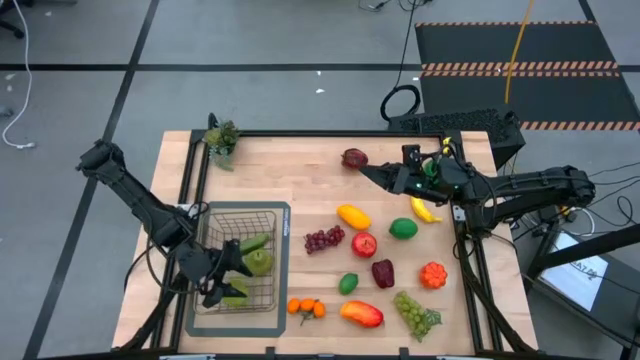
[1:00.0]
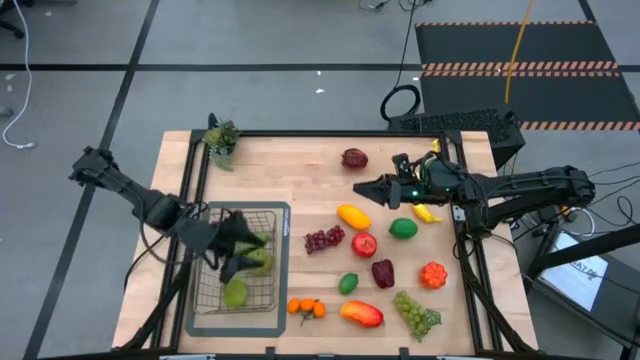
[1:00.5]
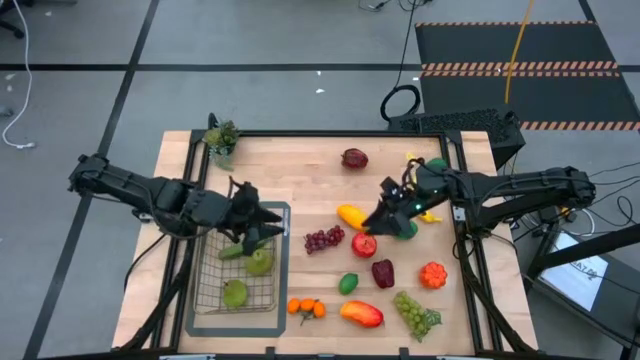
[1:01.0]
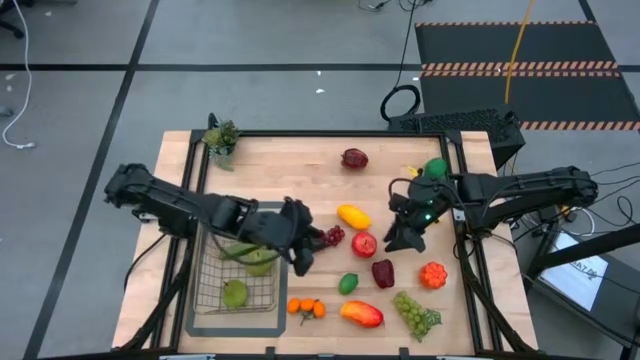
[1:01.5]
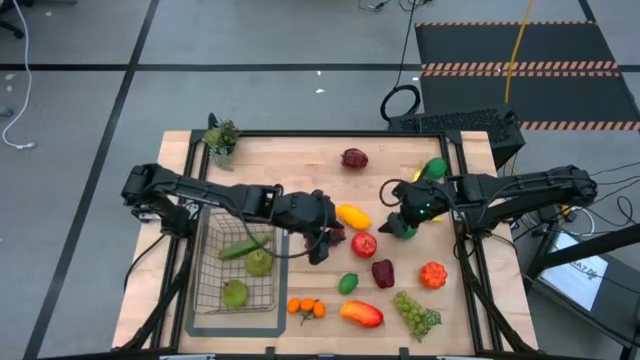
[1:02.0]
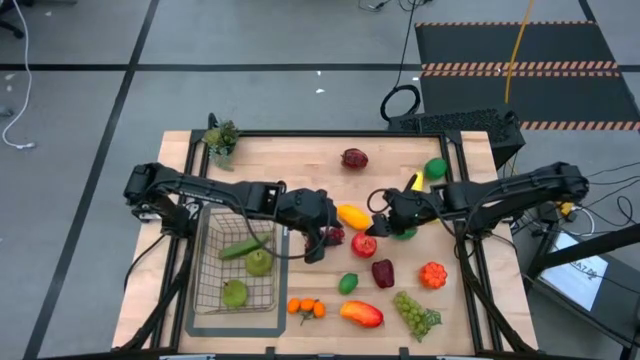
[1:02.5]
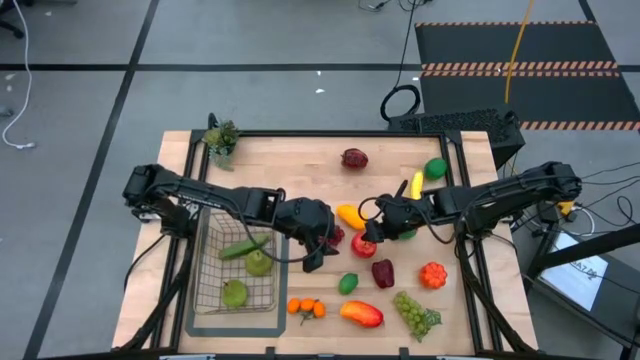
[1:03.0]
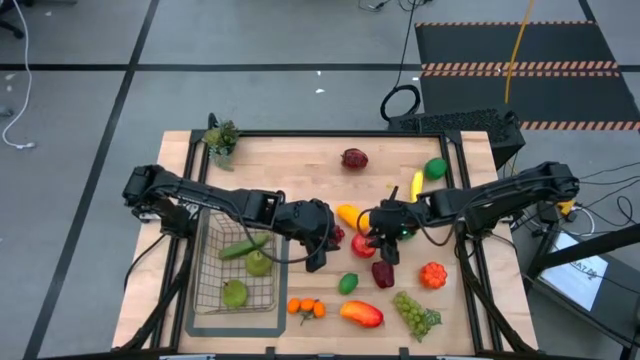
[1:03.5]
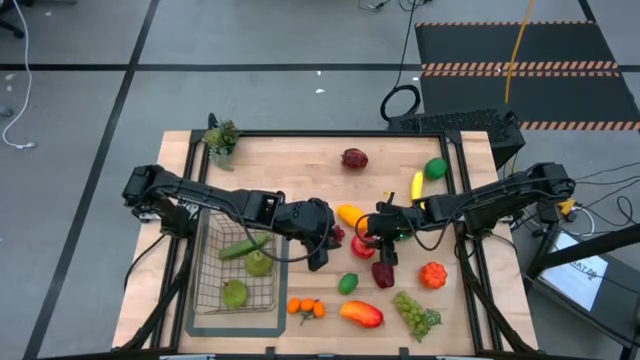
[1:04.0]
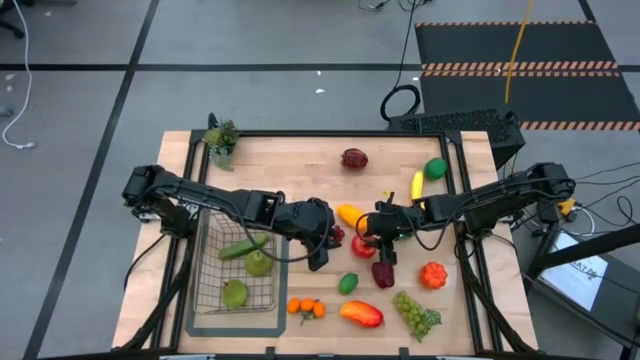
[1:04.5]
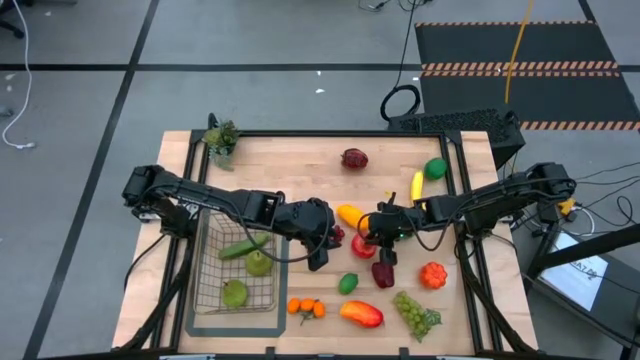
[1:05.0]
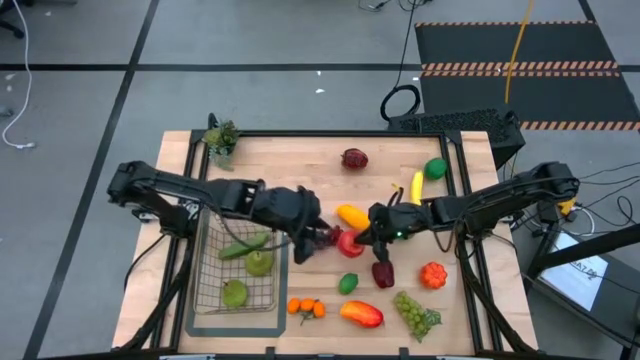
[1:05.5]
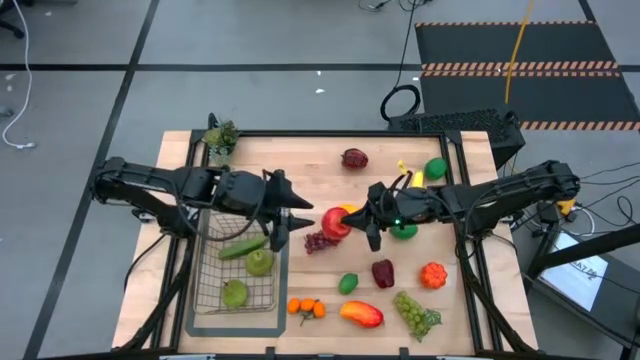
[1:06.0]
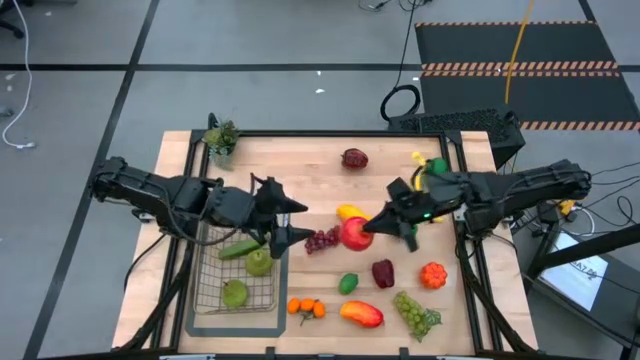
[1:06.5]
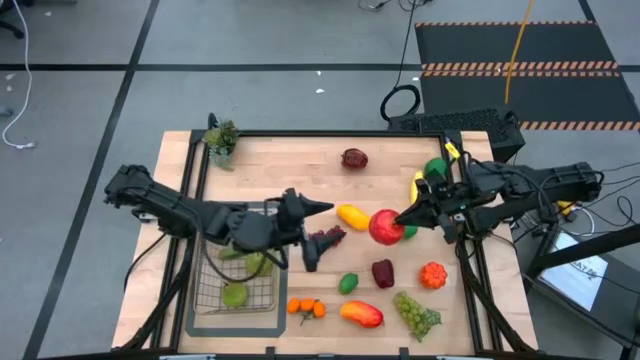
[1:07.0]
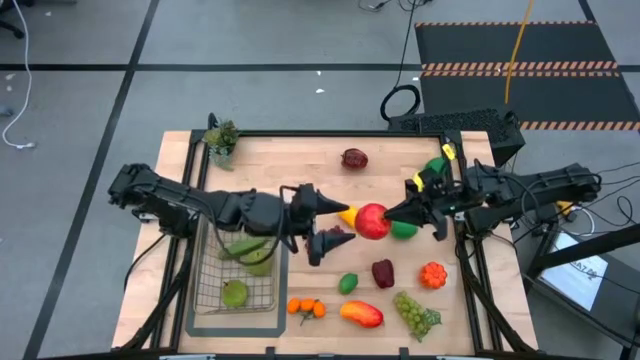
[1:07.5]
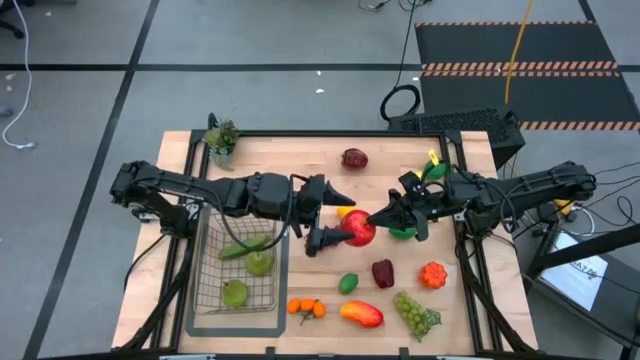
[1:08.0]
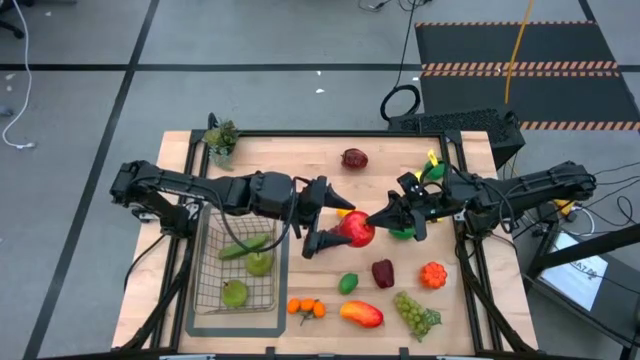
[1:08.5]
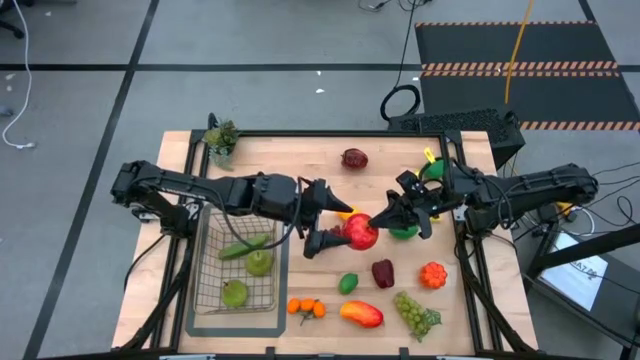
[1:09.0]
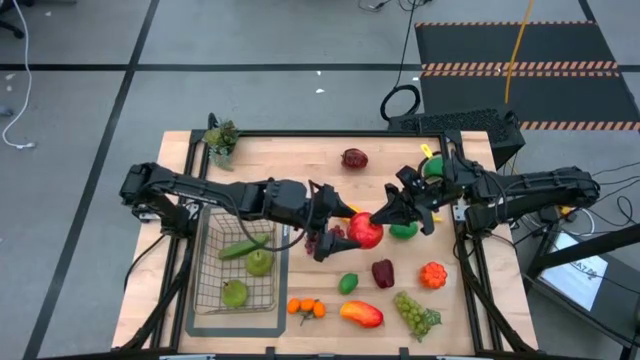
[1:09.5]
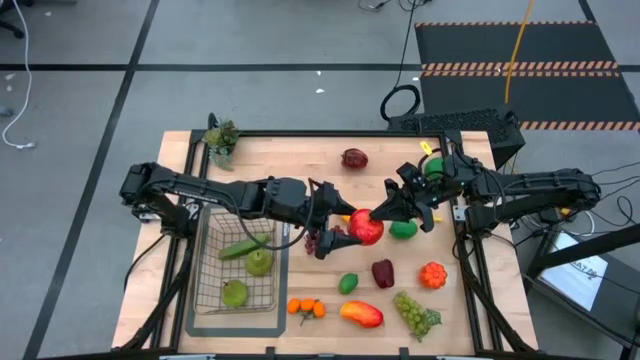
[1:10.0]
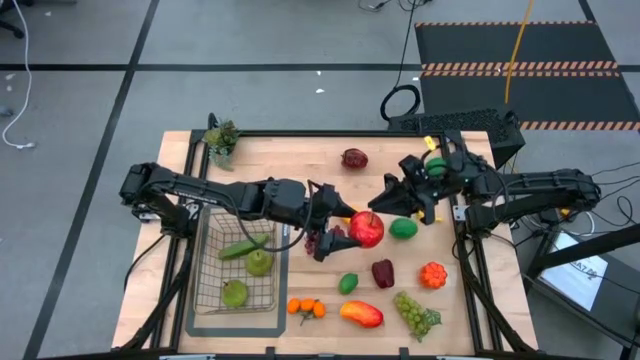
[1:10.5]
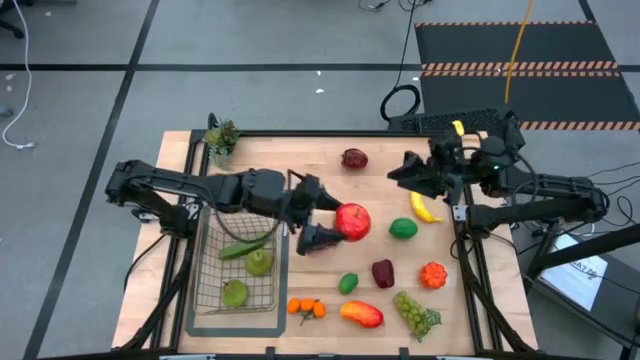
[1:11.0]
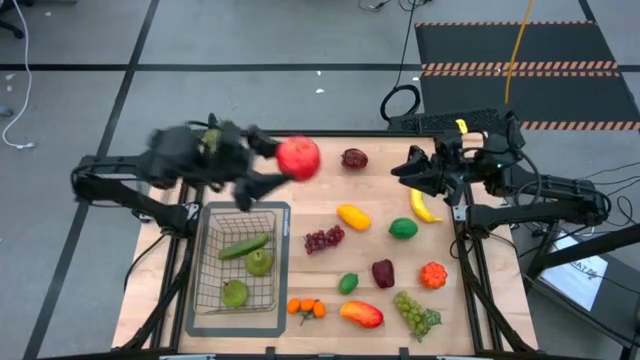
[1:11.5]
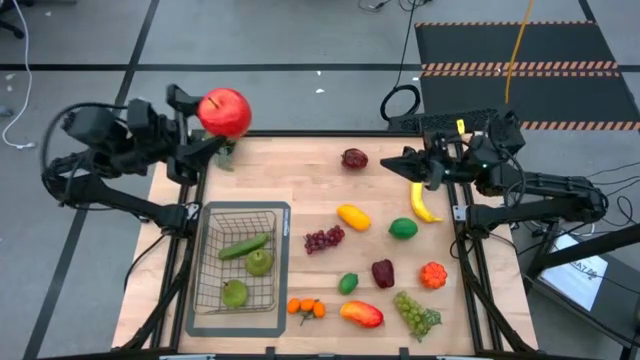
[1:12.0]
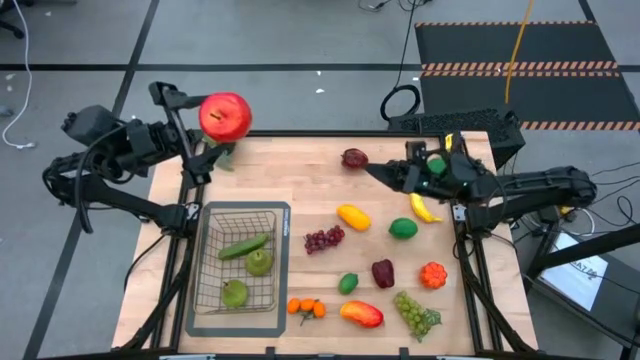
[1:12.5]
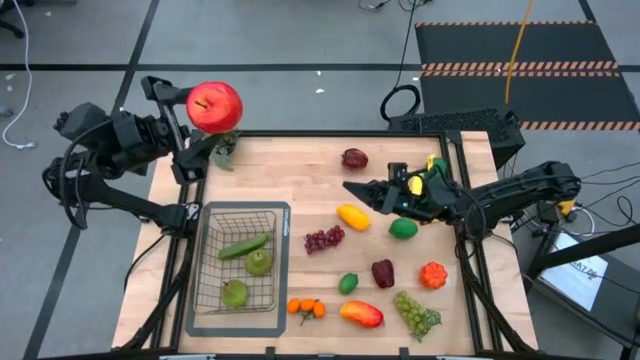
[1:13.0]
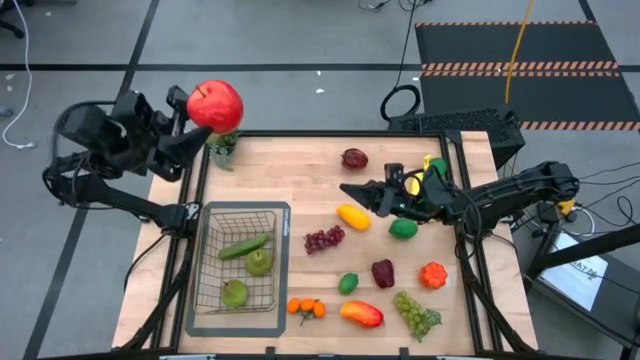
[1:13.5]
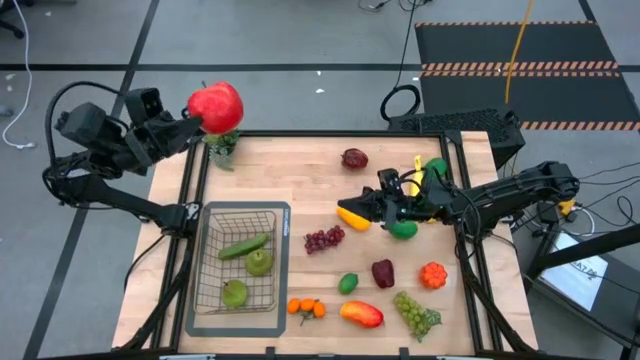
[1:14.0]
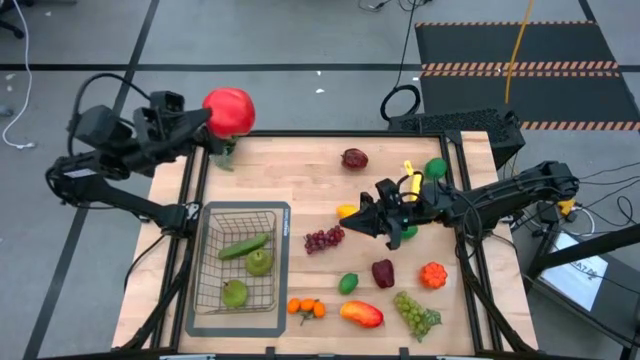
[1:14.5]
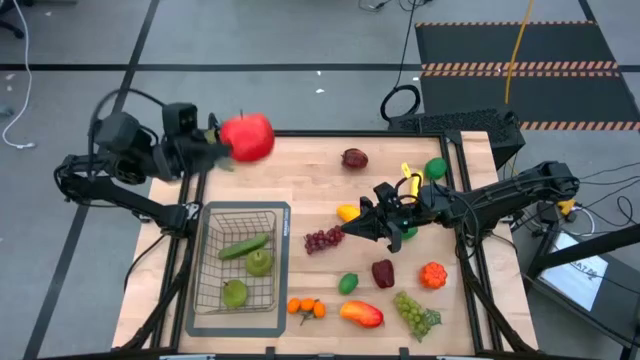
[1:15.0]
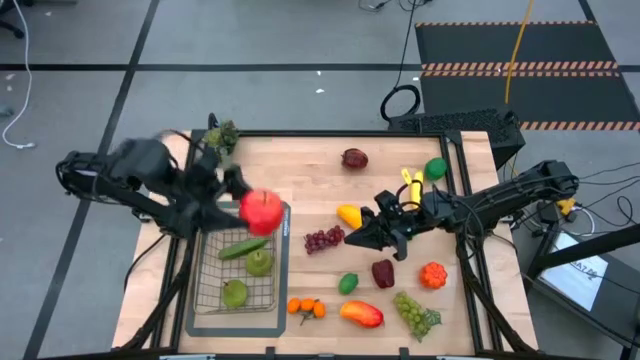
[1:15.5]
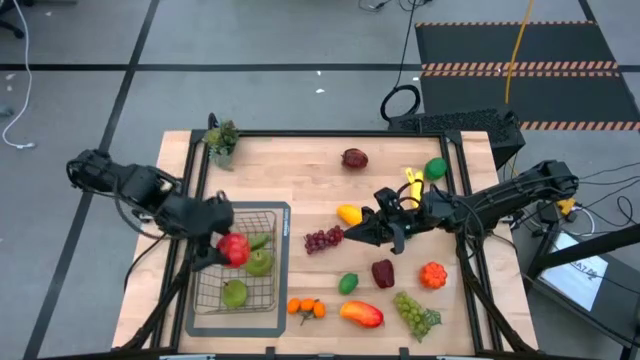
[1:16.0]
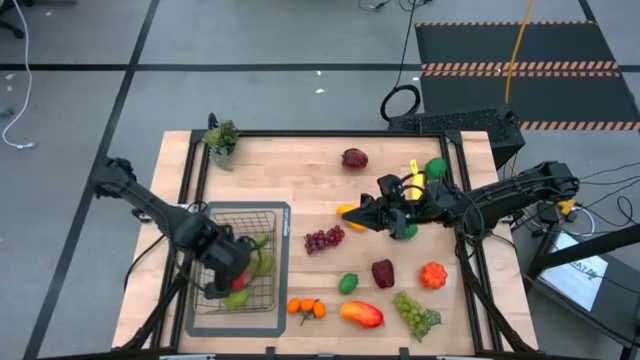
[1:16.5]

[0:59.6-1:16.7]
Task: Build produce basket
Put the red apple into the wire basket

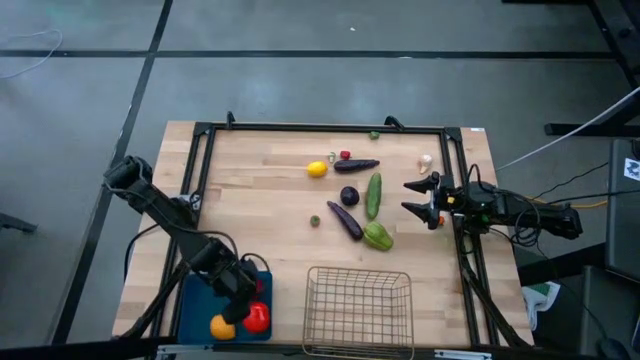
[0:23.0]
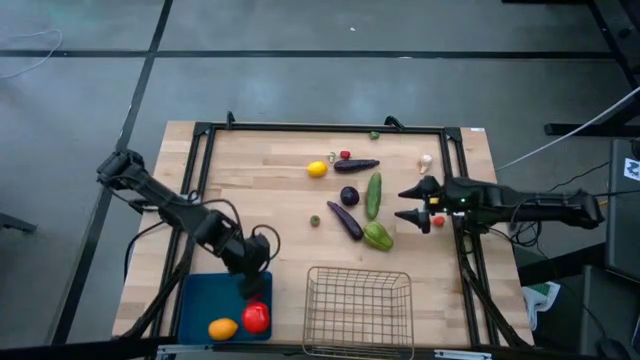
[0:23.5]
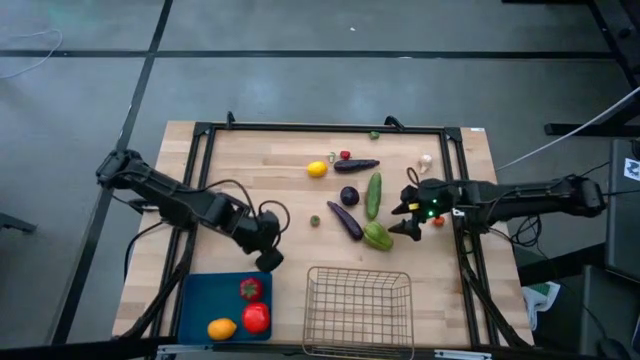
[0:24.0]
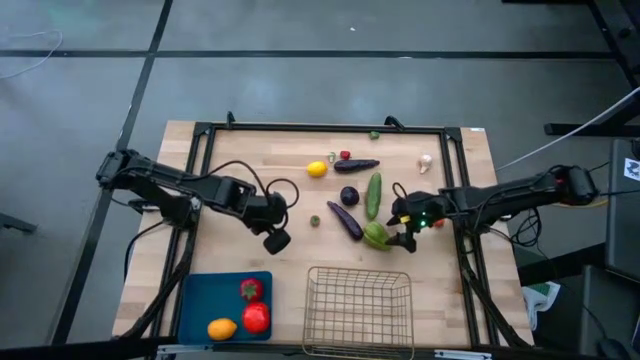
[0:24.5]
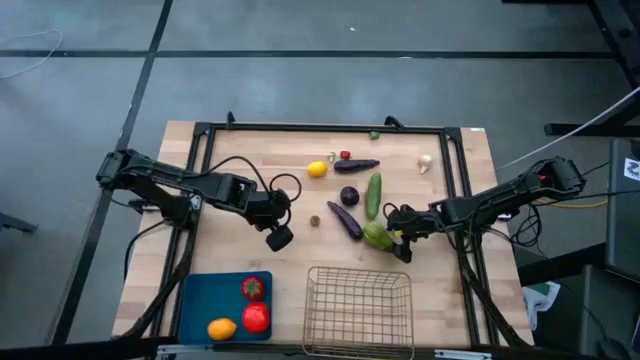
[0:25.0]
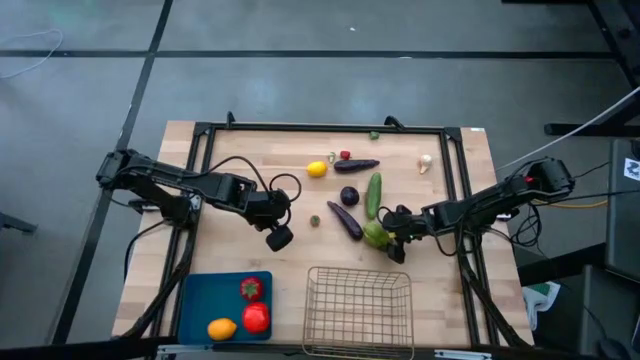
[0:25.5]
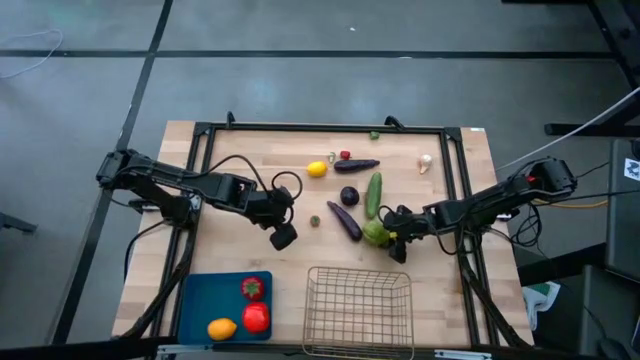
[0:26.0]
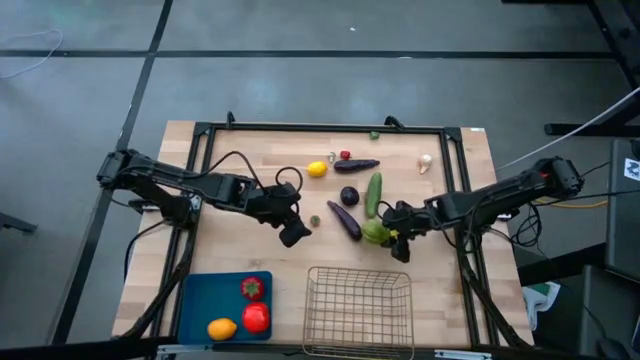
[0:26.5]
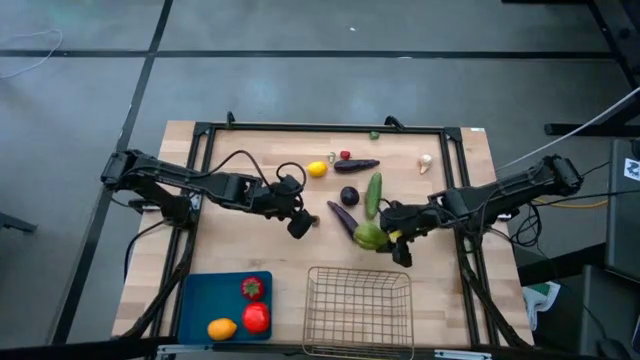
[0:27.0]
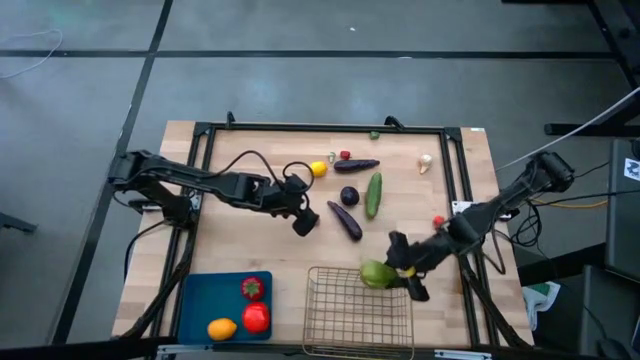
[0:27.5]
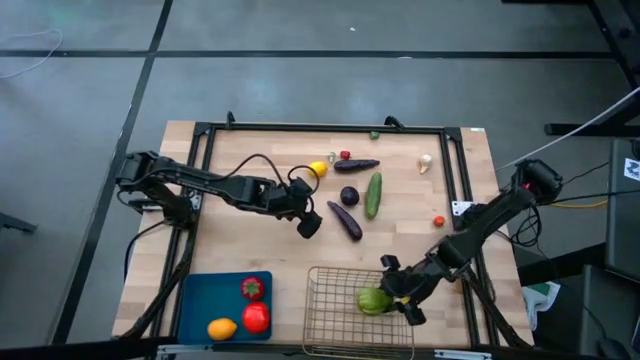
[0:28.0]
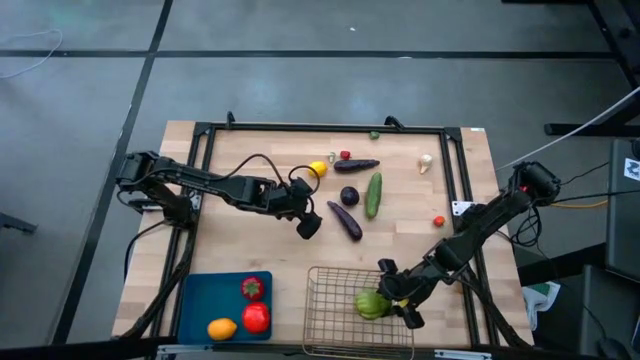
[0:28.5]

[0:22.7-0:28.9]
Task: Sort produce into baskets
Put the chayote into the gold wire basket
